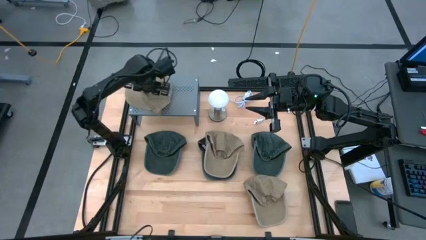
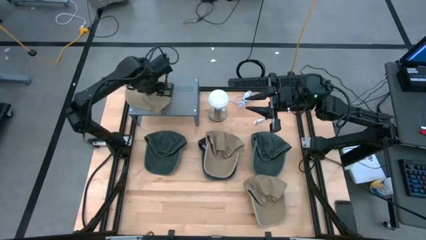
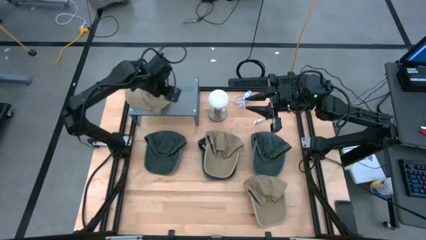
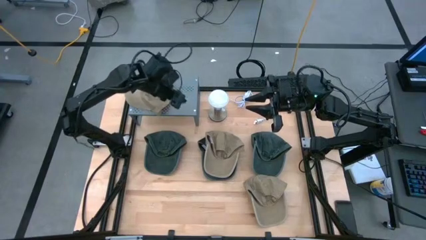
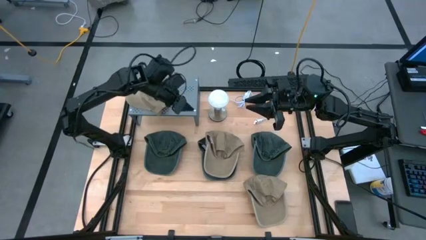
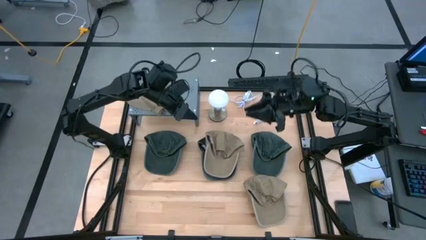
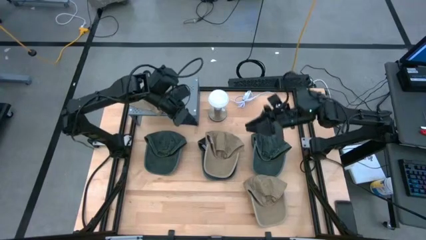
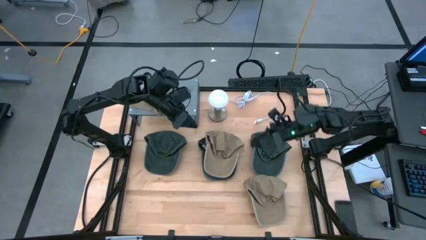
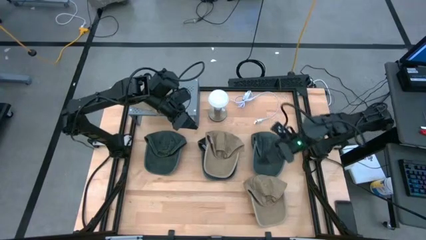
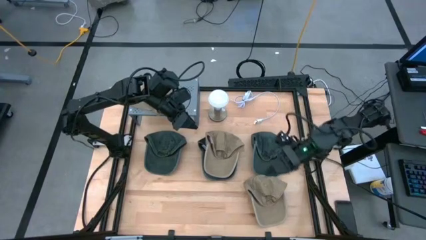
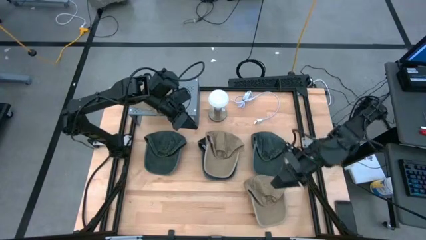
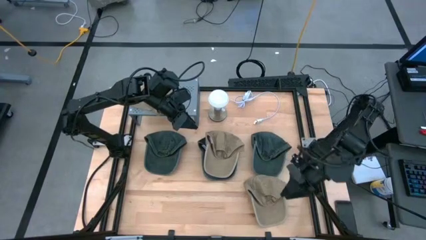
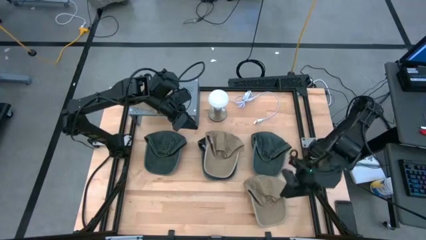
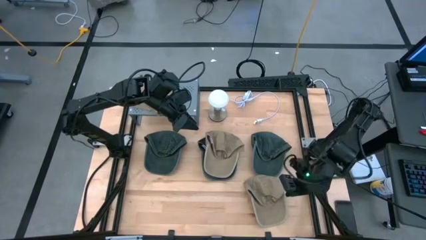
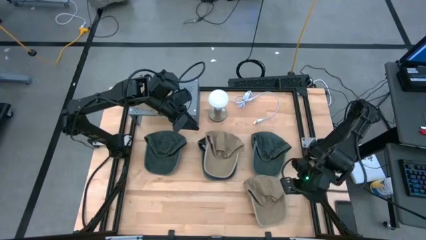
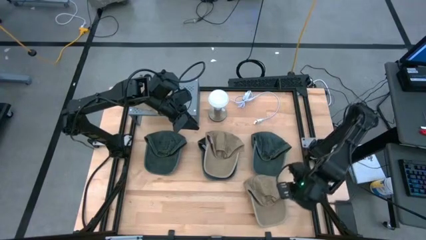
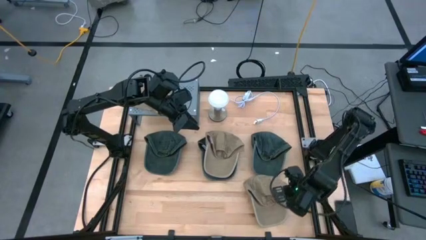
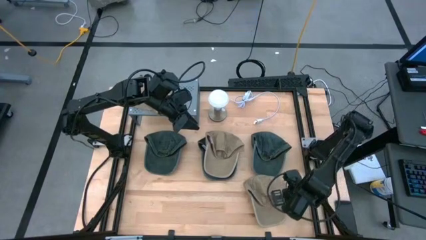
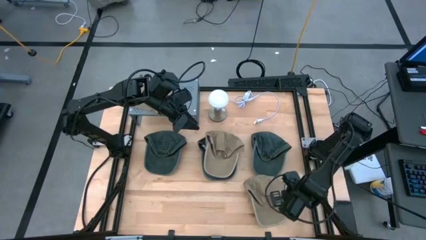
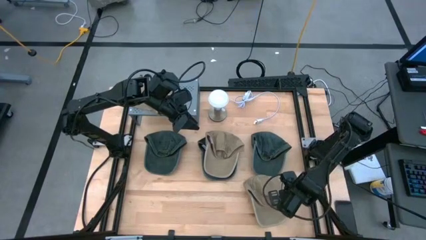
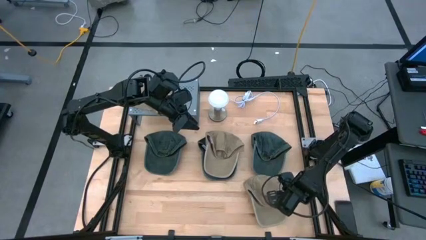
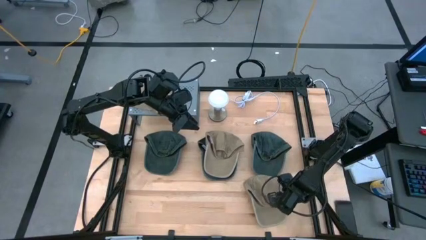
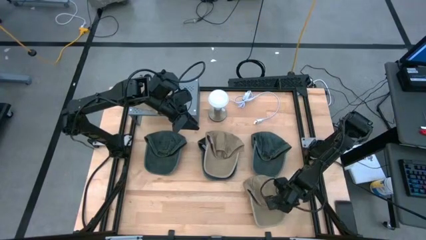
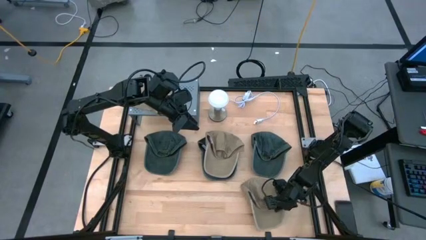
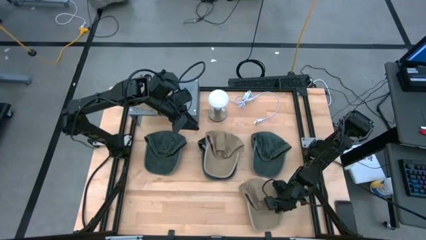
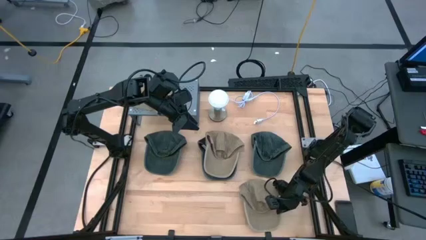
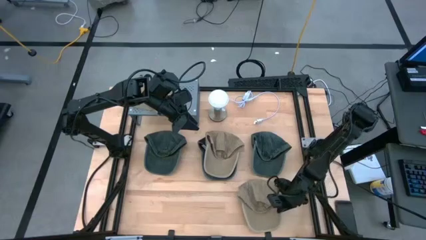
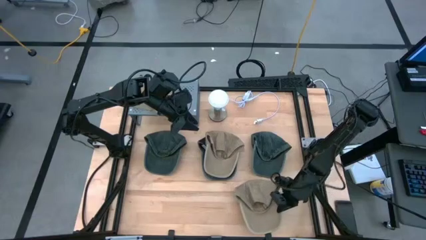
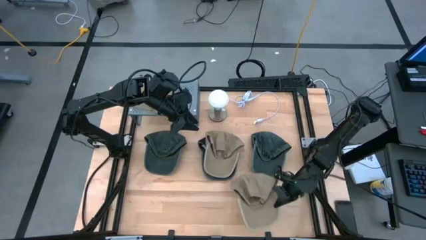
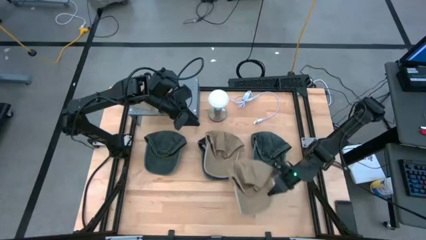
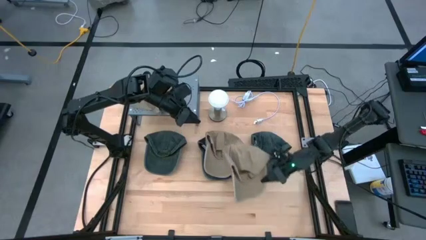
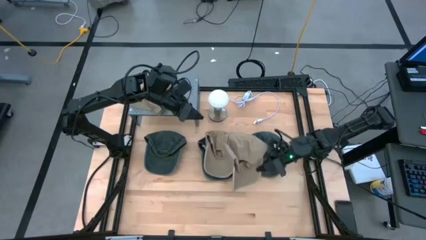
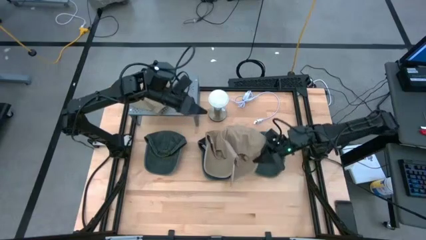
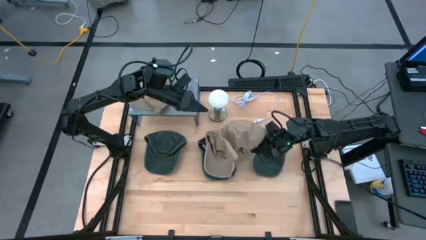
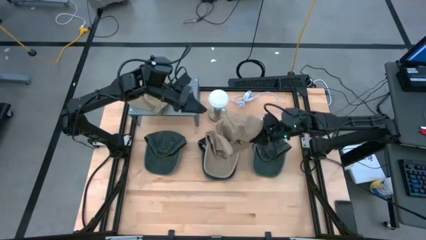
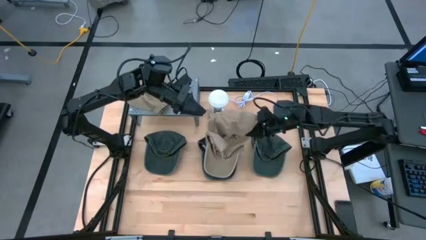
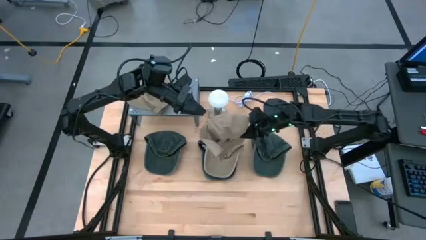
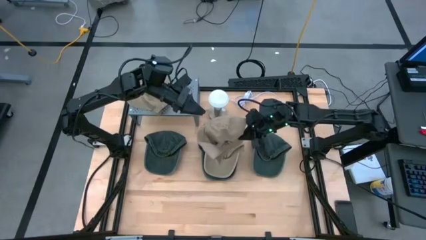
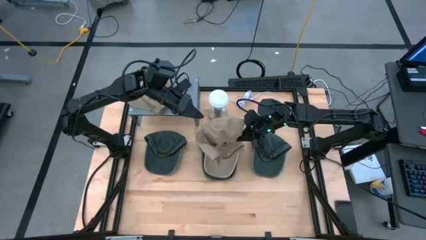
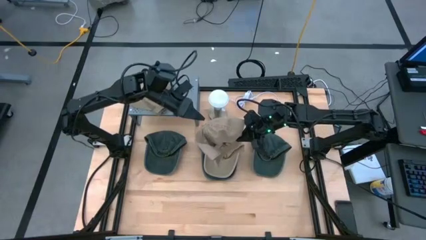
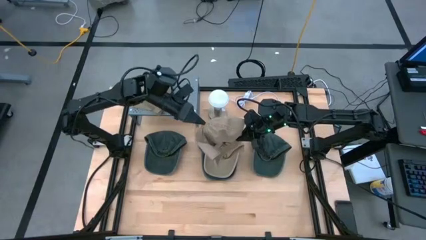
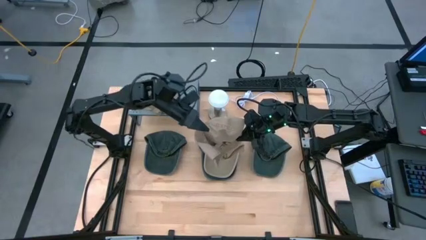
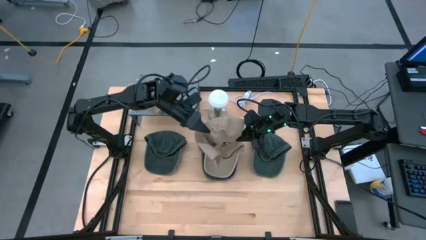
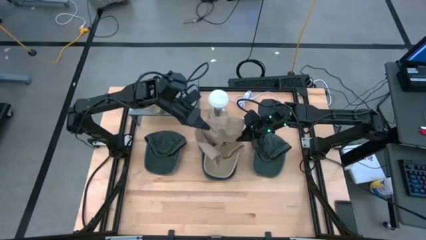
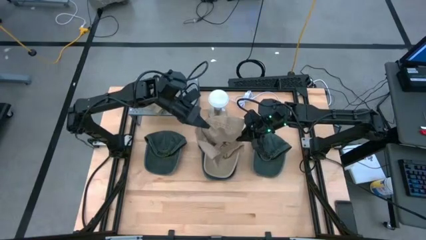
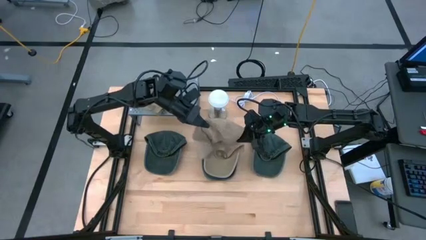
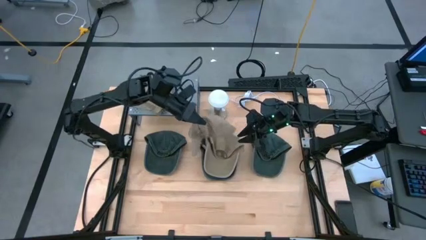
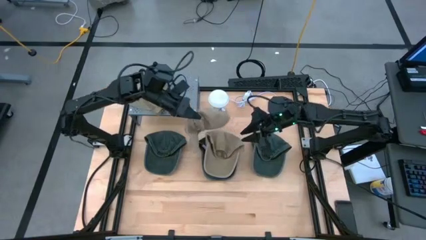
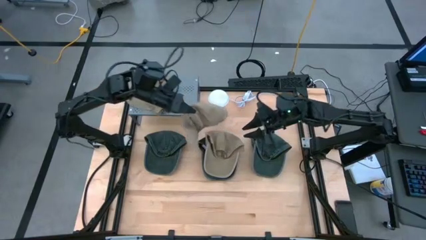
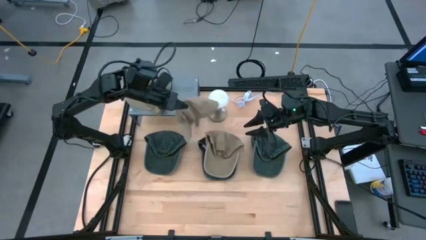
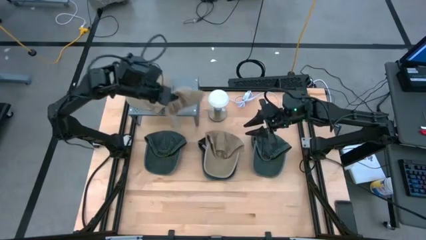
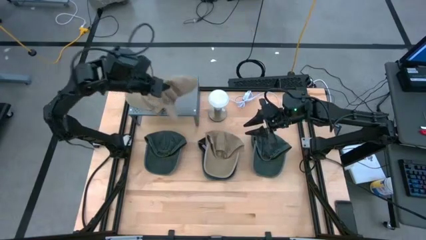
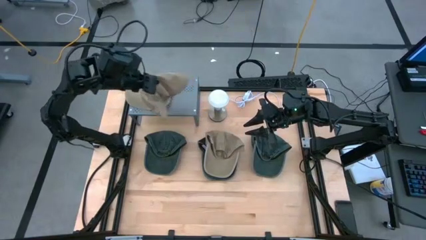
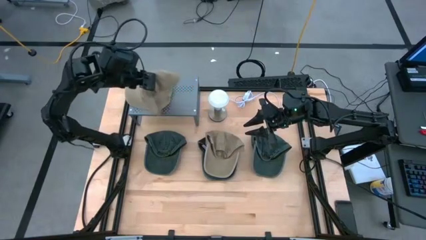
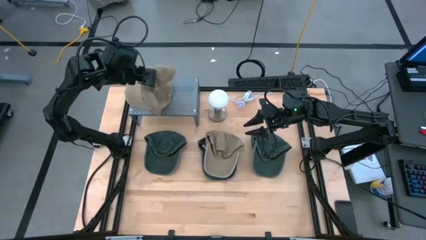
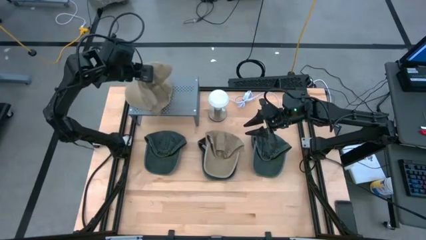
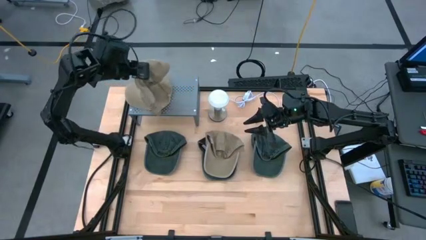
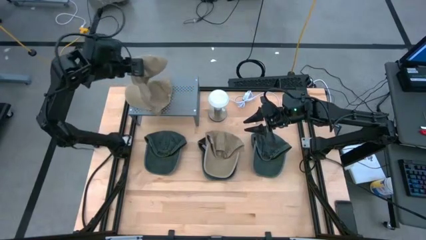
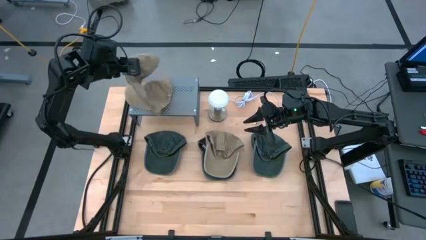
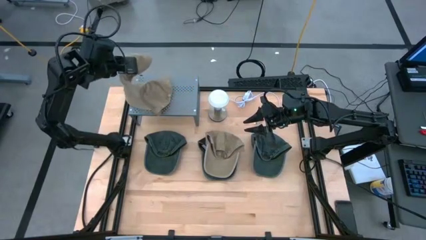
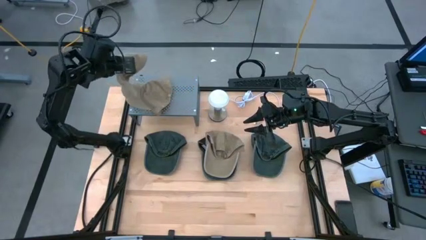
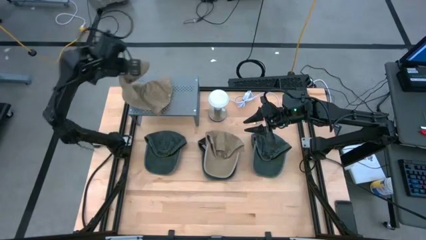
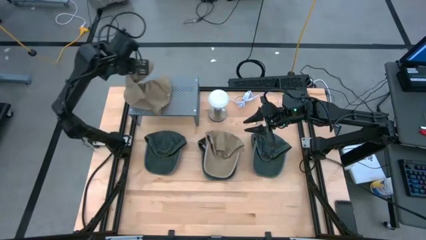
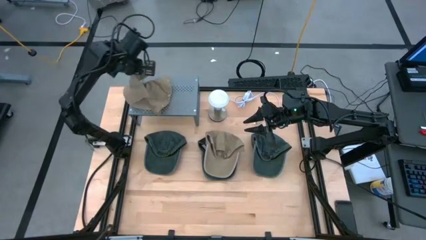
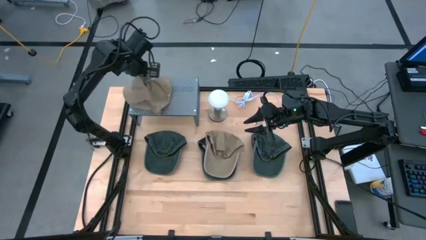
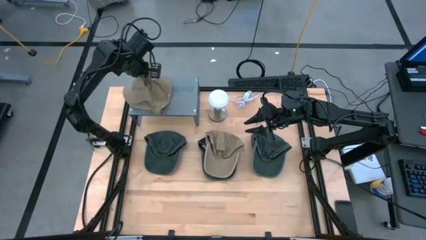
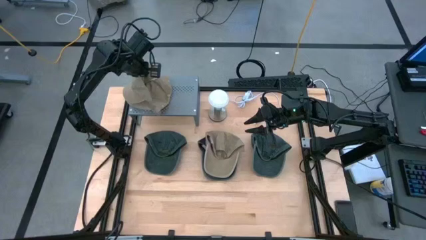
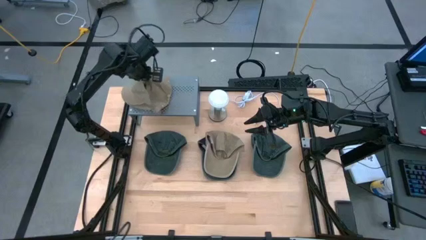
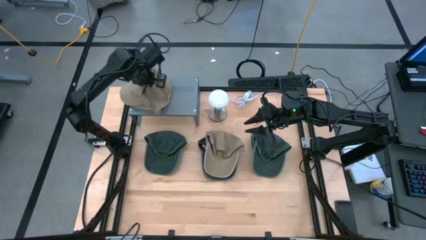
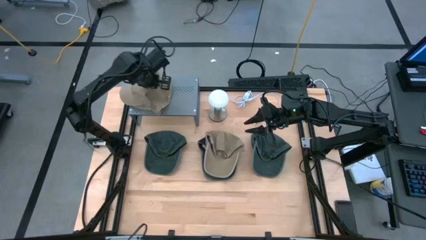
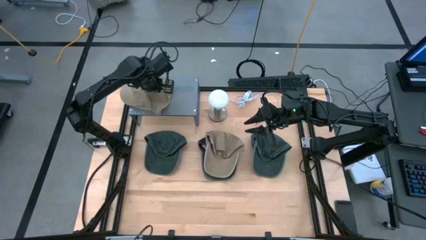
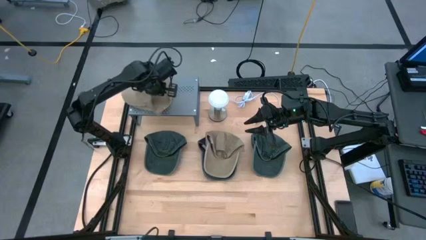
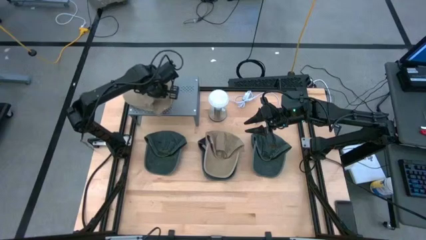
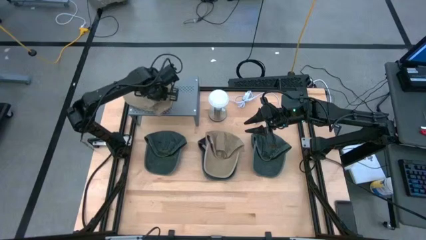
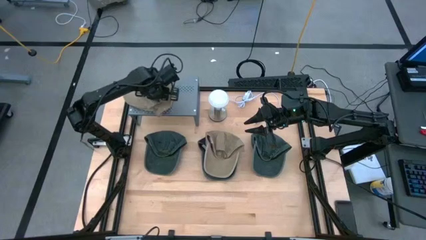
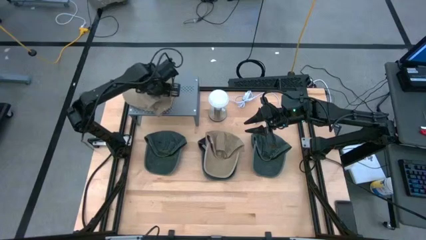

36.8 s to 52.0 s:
Task: Pick & Place hat
Stack the right brown cap on the brown cap on the shelf
